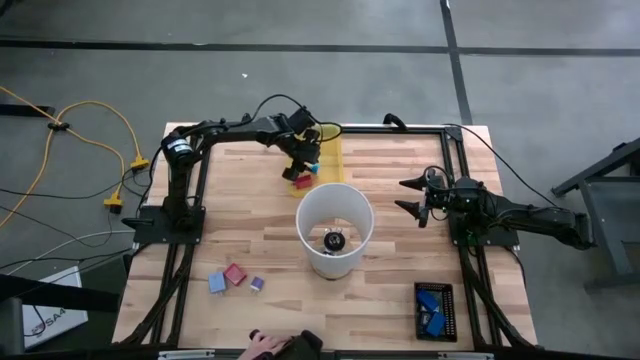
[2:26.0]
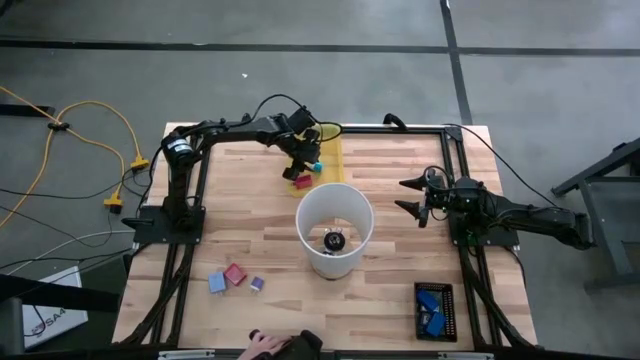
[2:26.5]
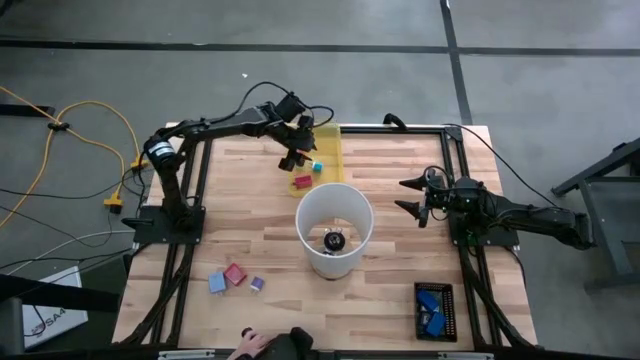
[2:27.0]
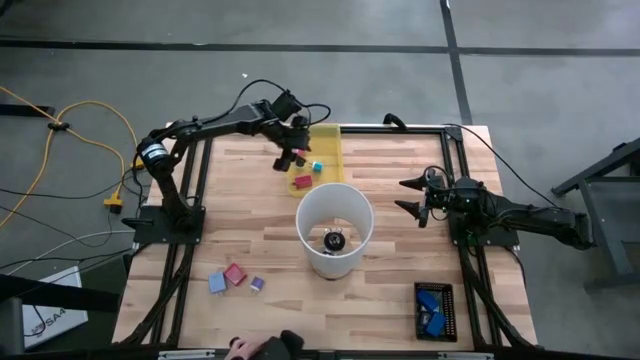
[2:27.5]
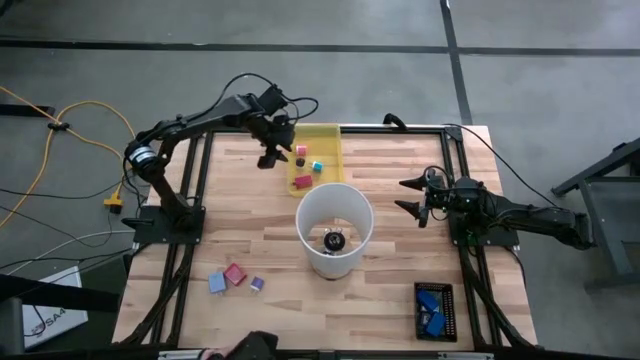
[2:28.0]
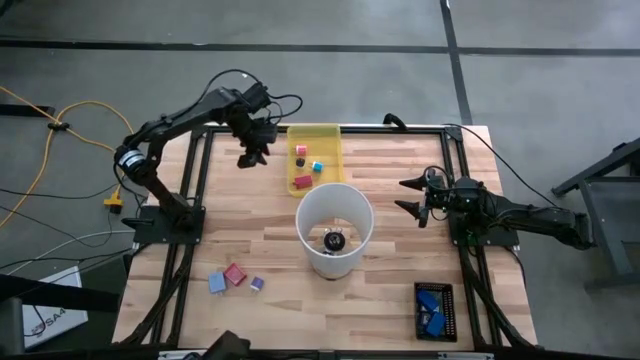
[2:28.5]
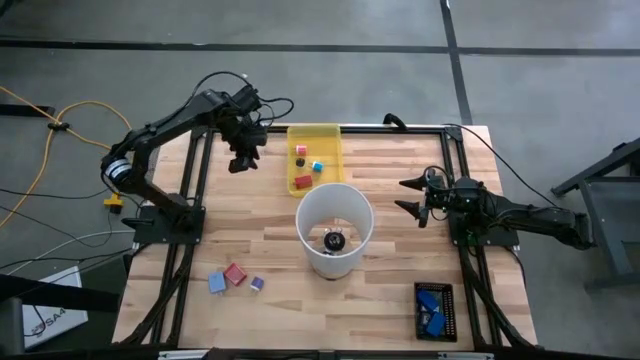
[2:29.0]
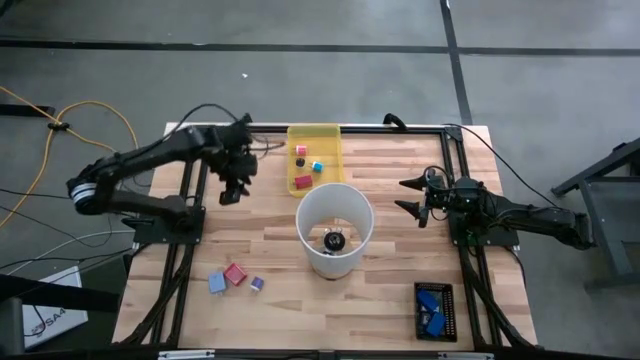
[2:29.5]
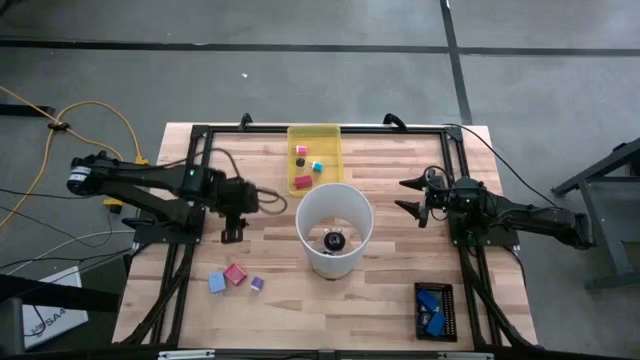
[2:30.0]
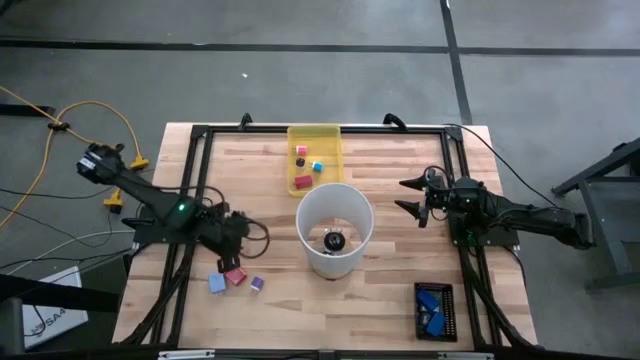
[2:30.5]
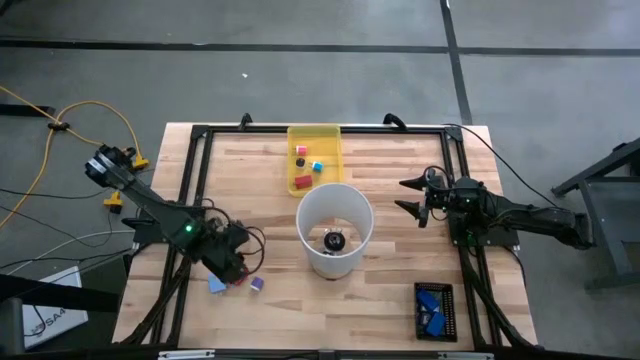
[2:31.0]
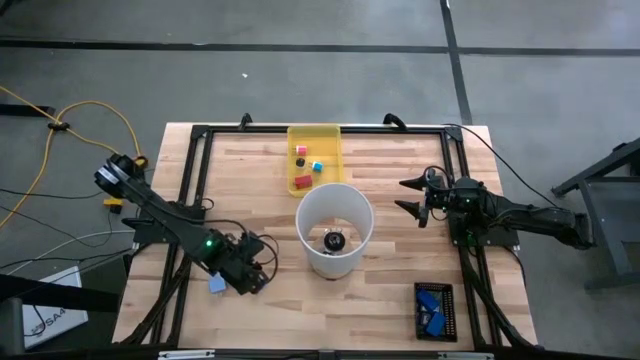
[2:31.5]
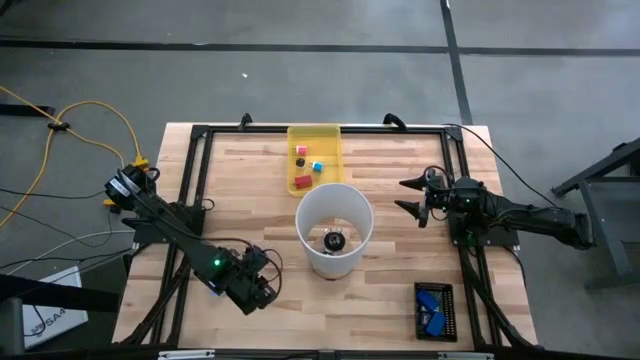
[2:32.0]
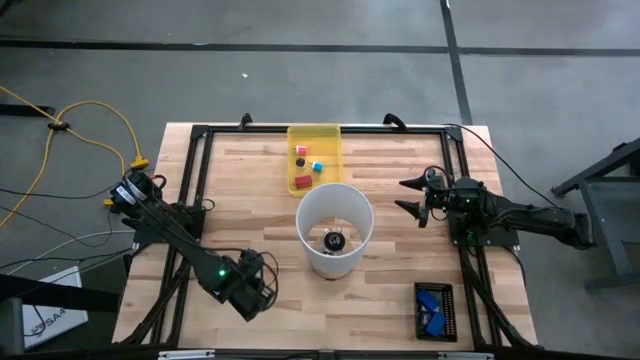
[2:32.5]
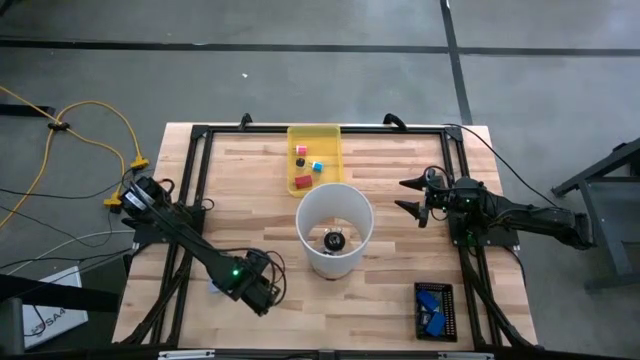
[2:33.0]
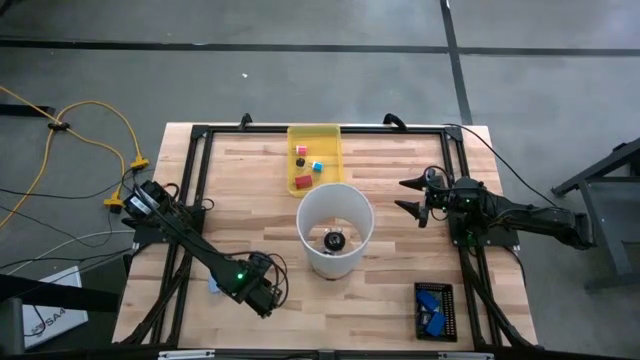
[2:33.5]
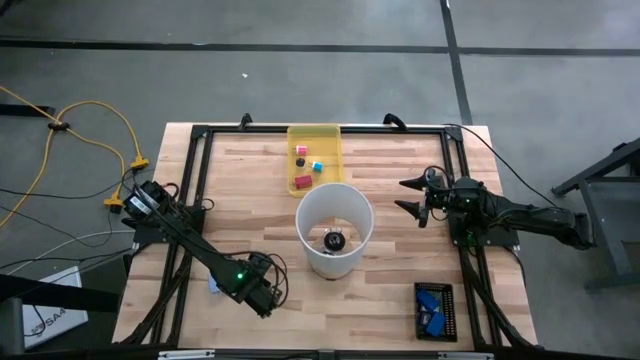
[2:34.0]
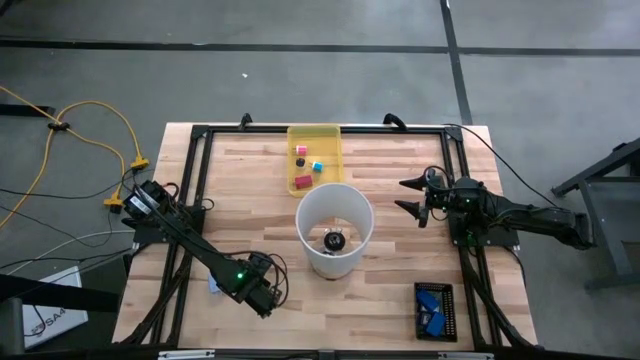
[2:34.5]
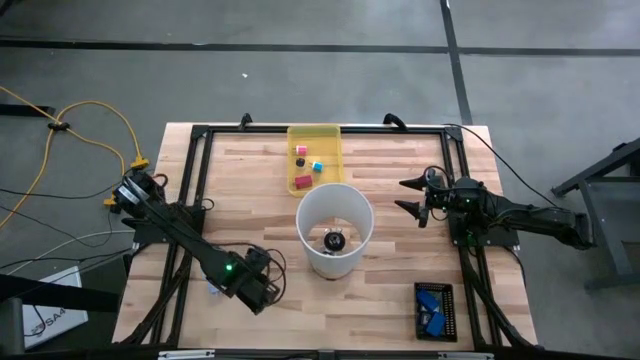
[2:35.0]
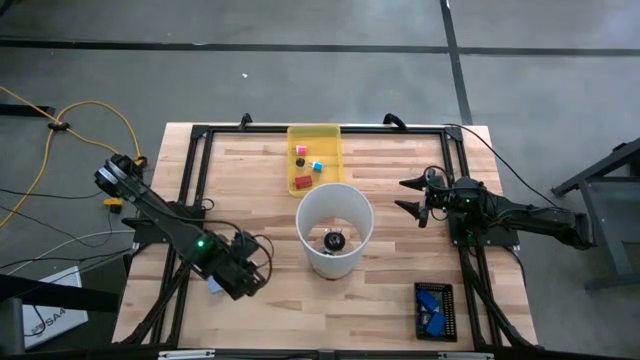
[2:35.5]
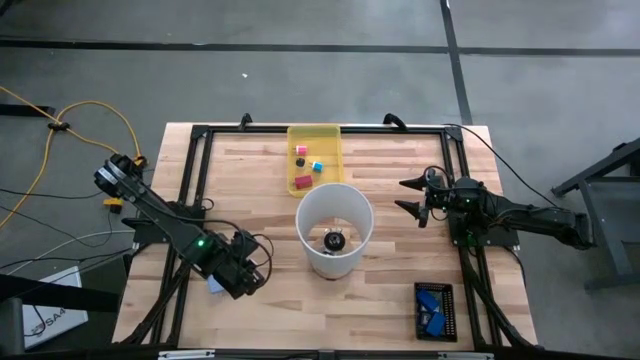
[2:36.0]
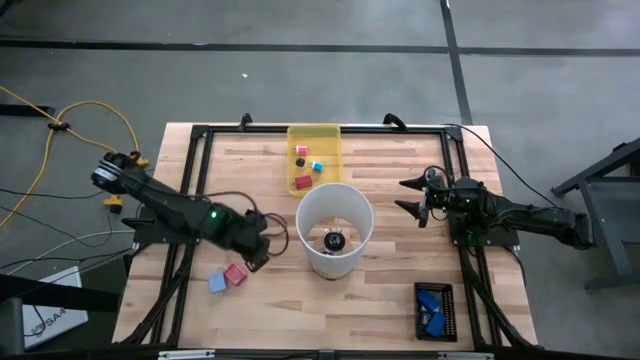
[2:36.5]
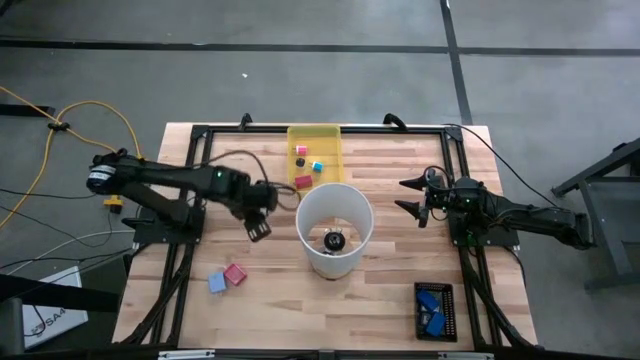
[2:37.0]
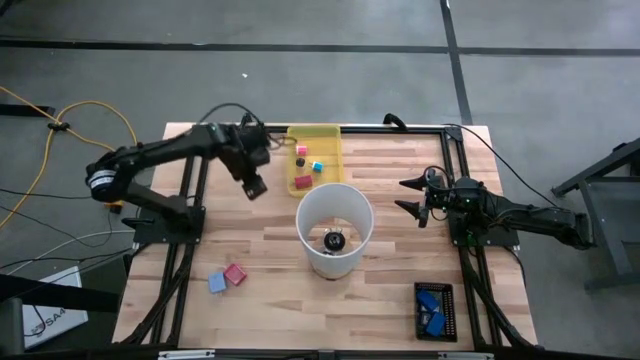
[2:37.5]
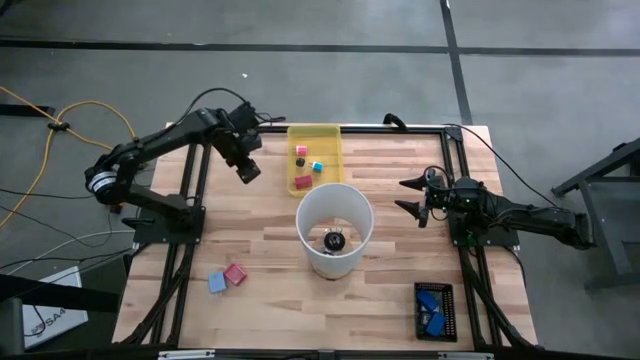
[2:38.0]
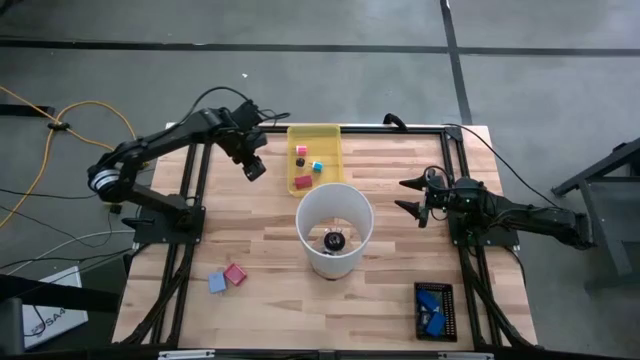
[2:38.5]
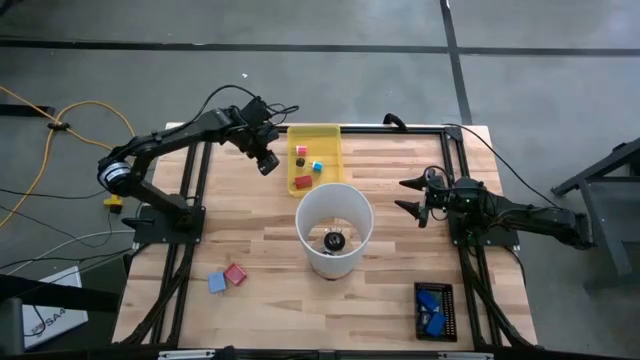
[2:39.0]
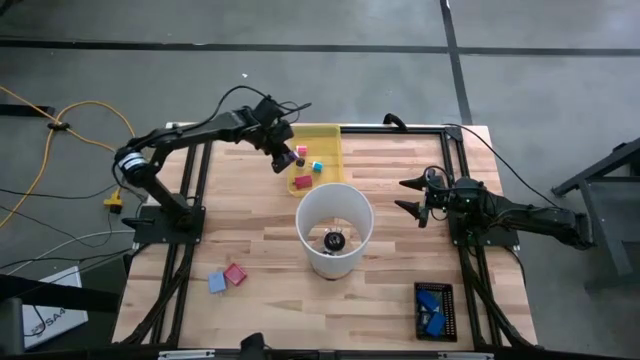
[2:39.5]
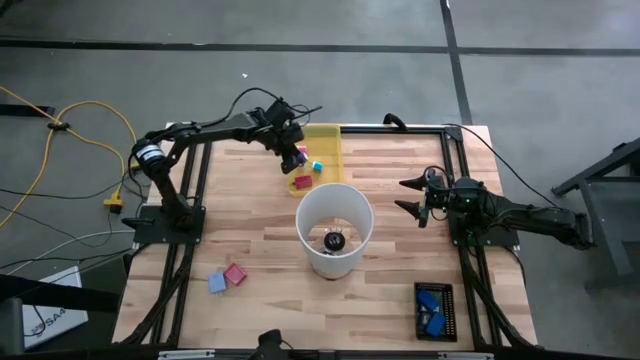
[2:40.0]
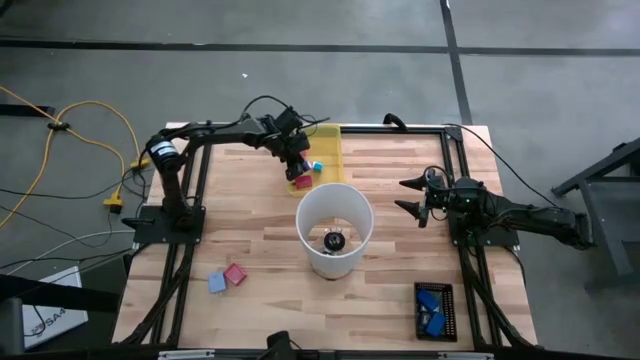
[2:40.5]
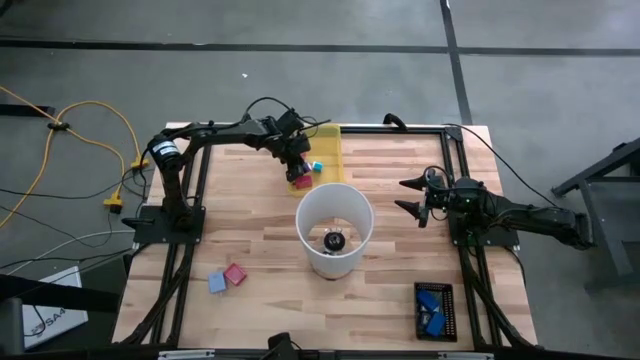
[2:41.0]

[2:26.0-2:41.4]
Task: Pick & Place Office items
Put the purple charger adapter into the yellow bin
